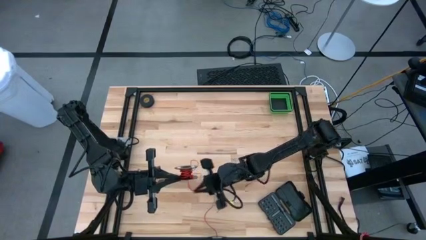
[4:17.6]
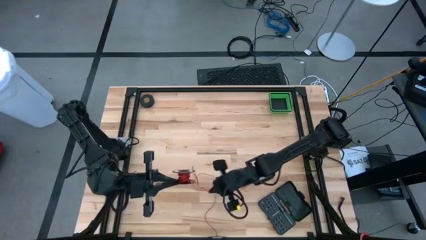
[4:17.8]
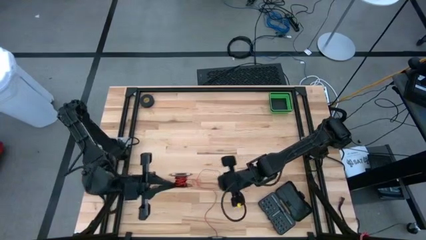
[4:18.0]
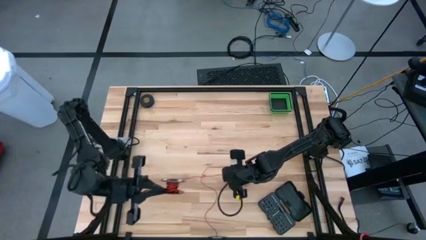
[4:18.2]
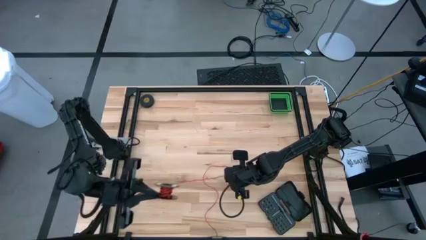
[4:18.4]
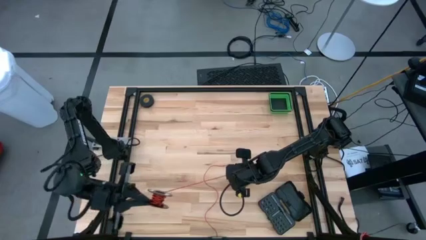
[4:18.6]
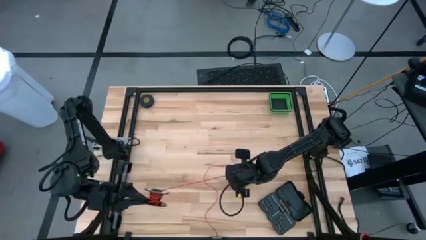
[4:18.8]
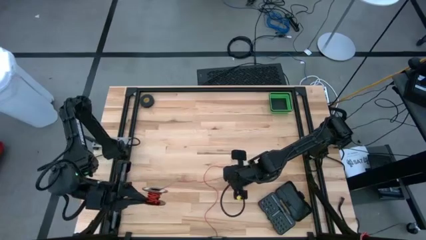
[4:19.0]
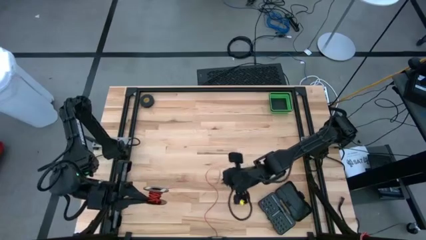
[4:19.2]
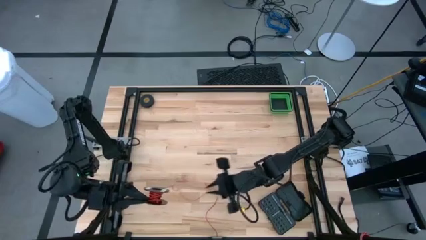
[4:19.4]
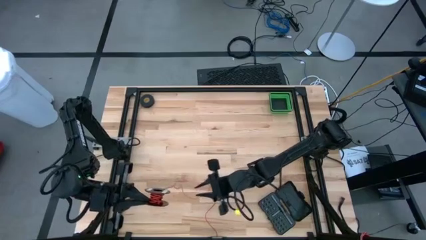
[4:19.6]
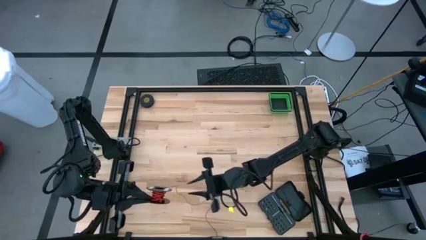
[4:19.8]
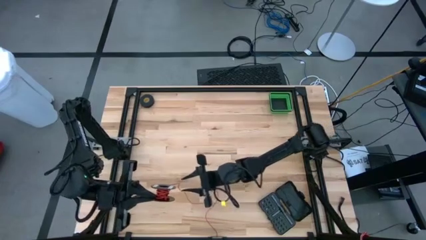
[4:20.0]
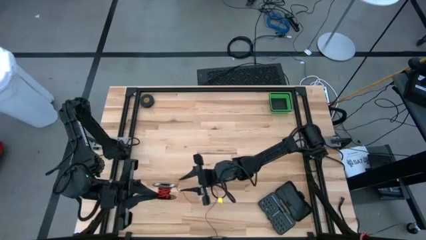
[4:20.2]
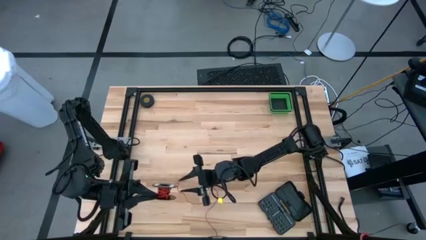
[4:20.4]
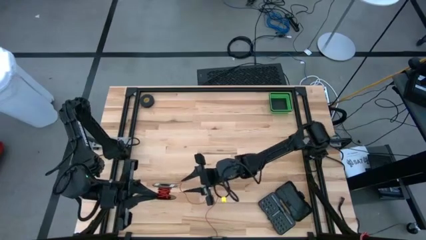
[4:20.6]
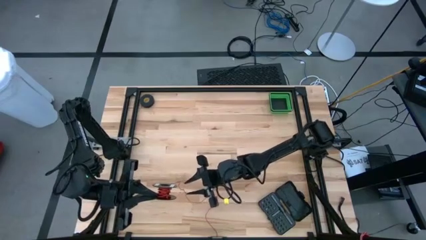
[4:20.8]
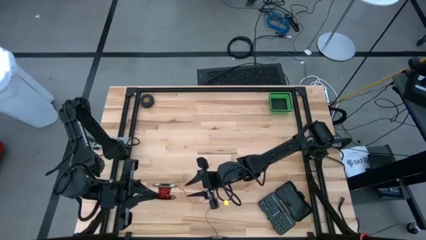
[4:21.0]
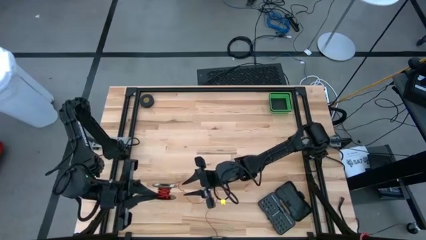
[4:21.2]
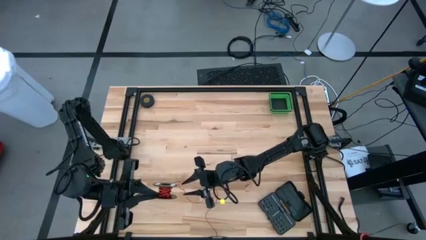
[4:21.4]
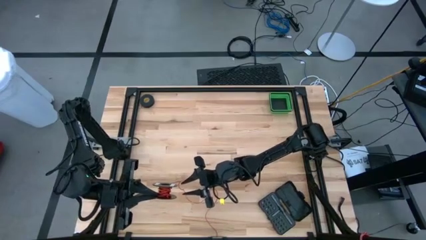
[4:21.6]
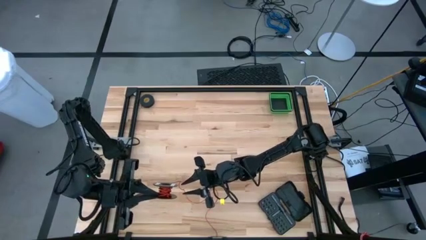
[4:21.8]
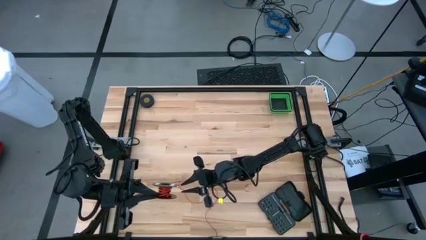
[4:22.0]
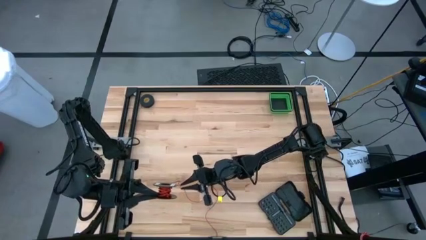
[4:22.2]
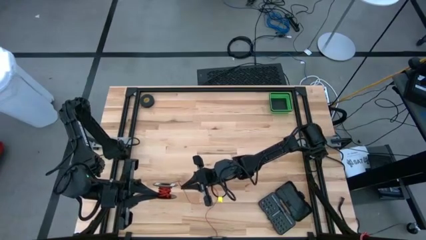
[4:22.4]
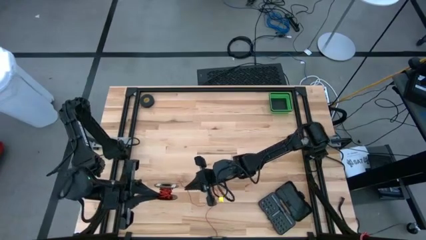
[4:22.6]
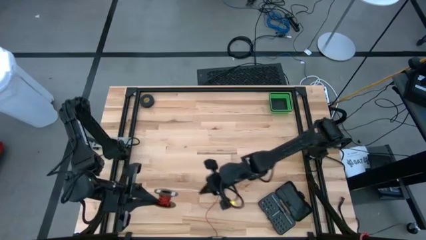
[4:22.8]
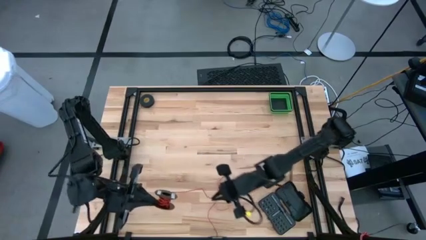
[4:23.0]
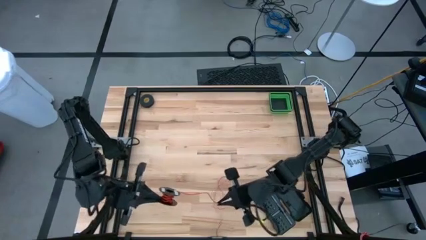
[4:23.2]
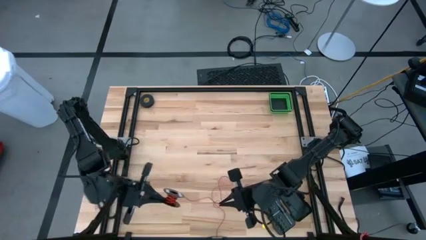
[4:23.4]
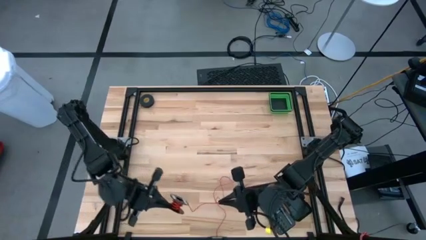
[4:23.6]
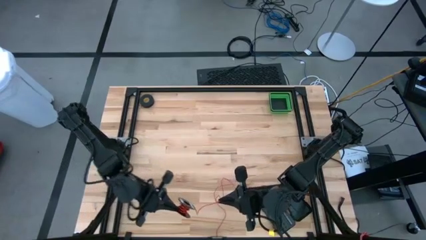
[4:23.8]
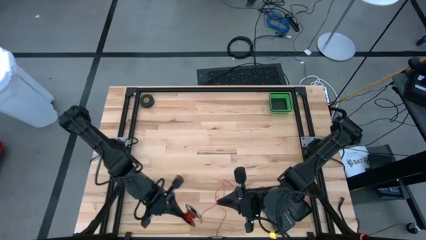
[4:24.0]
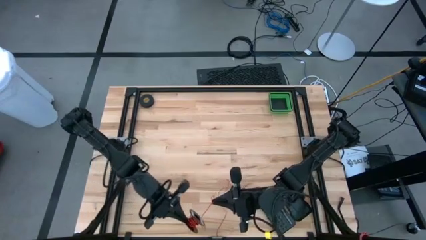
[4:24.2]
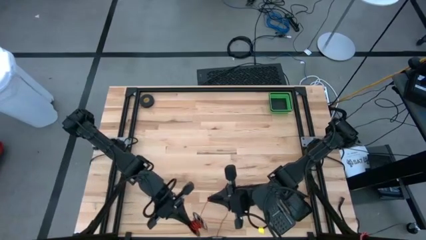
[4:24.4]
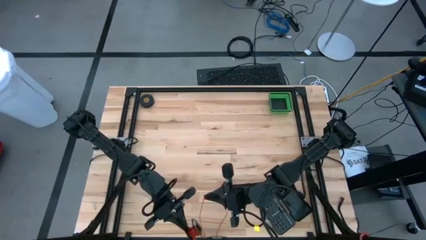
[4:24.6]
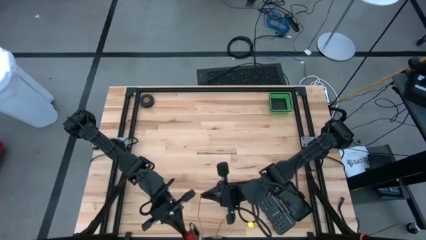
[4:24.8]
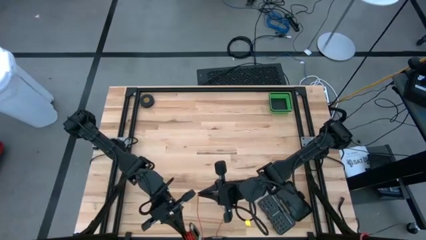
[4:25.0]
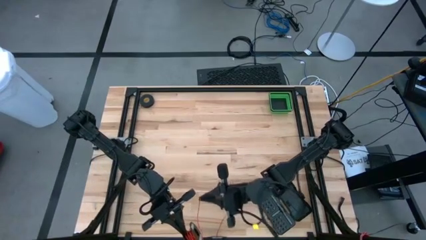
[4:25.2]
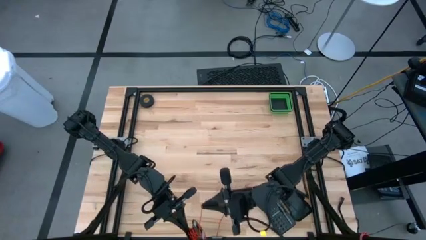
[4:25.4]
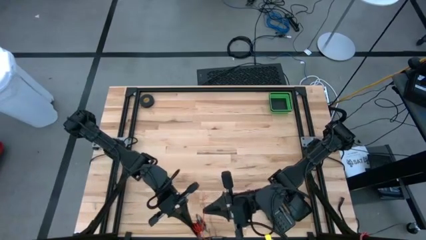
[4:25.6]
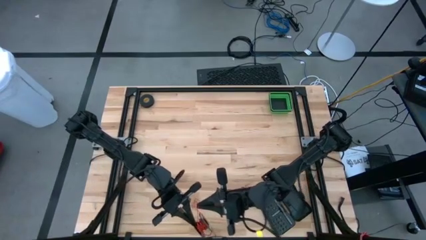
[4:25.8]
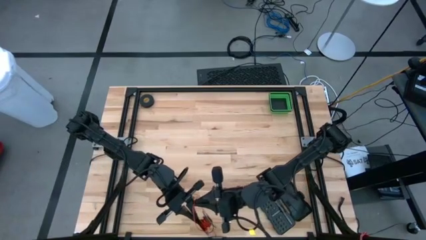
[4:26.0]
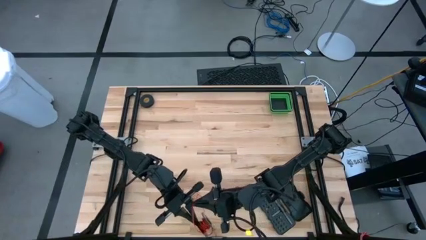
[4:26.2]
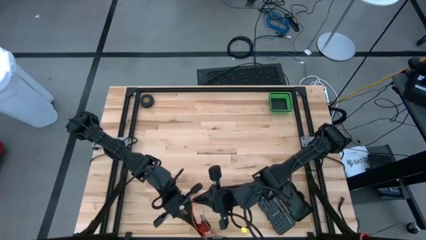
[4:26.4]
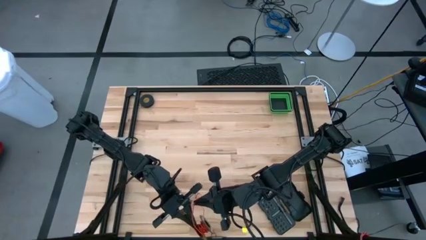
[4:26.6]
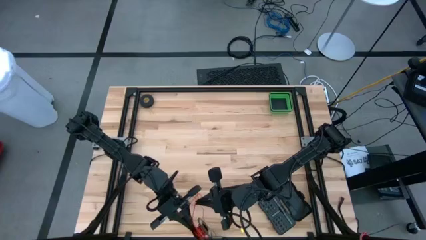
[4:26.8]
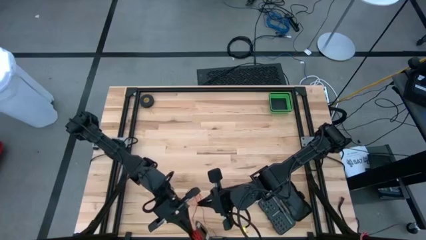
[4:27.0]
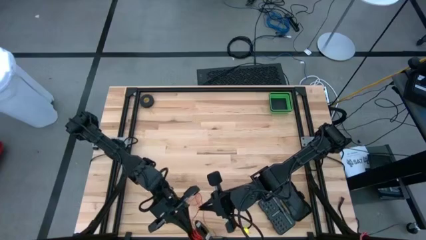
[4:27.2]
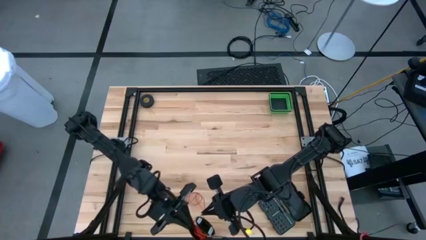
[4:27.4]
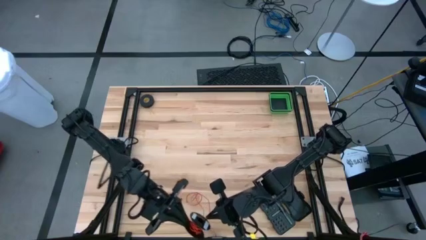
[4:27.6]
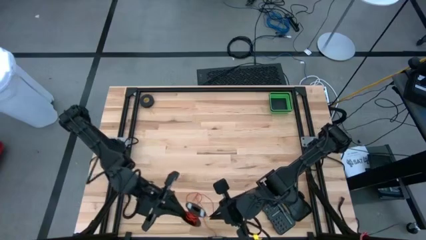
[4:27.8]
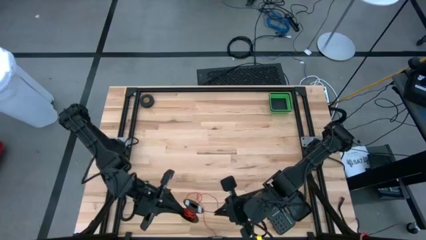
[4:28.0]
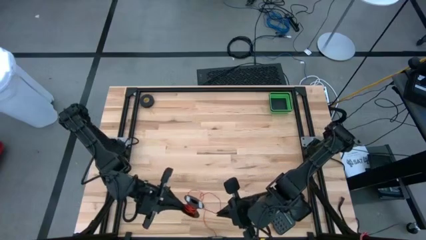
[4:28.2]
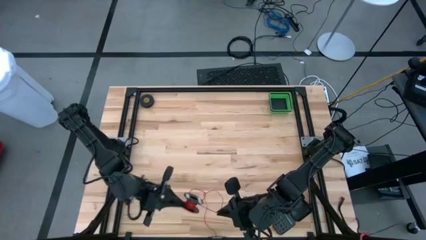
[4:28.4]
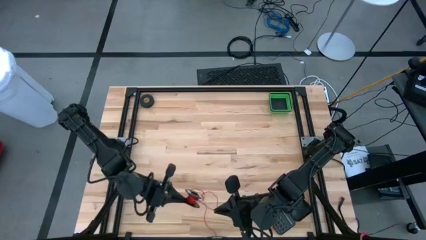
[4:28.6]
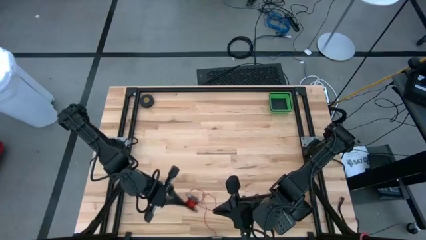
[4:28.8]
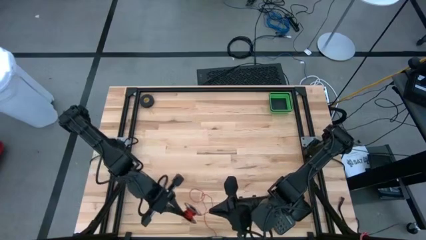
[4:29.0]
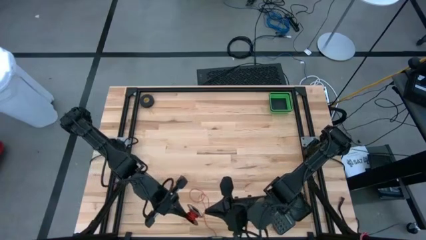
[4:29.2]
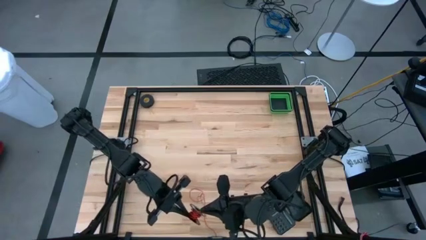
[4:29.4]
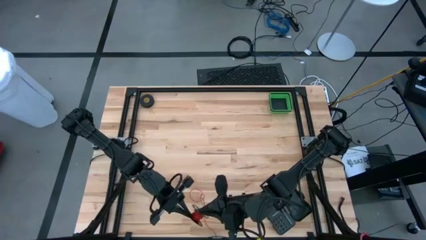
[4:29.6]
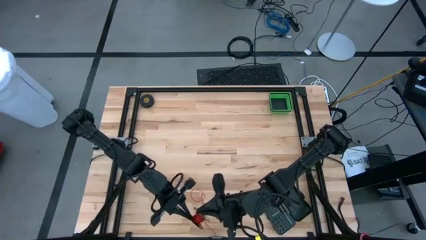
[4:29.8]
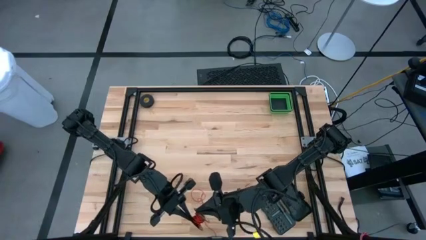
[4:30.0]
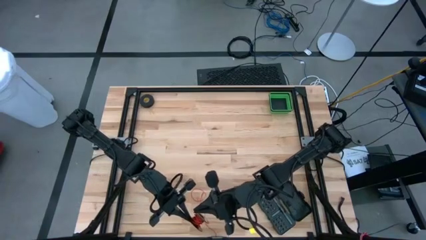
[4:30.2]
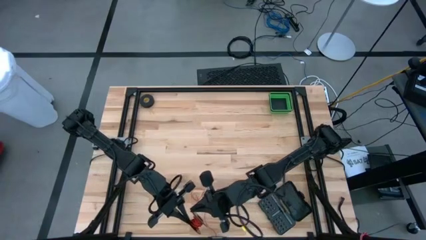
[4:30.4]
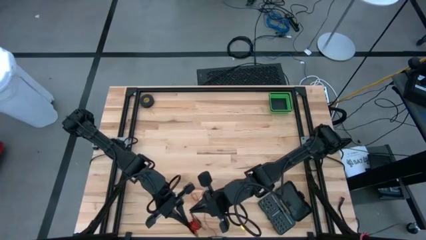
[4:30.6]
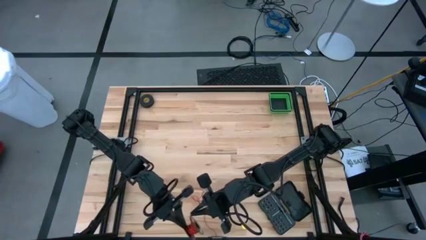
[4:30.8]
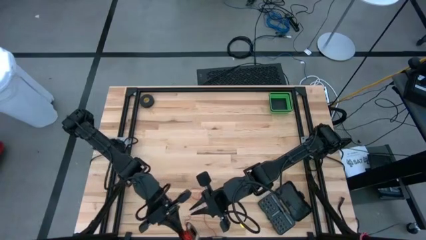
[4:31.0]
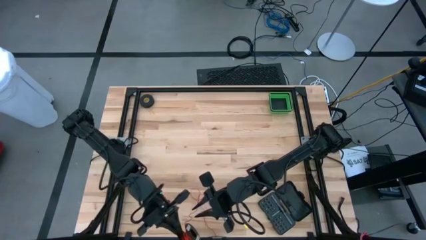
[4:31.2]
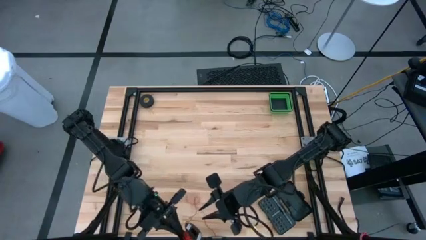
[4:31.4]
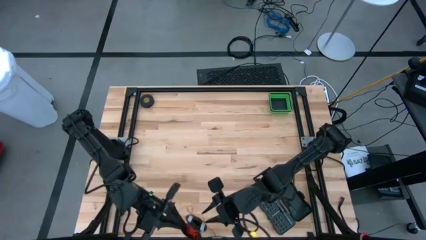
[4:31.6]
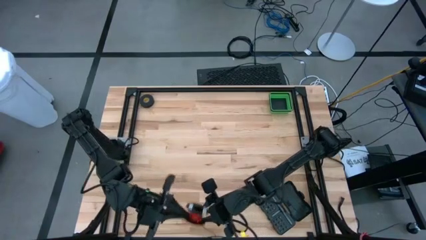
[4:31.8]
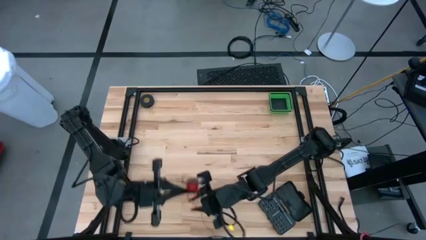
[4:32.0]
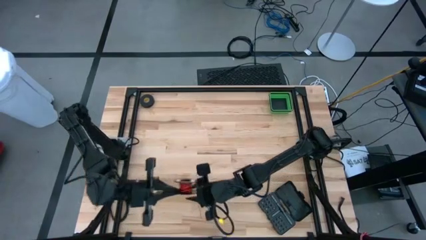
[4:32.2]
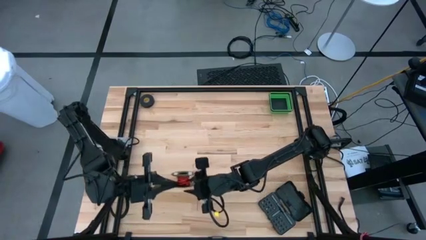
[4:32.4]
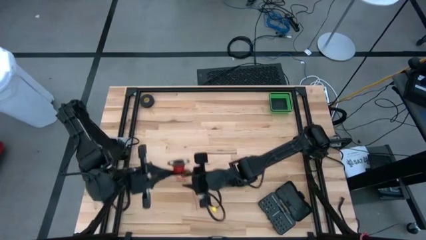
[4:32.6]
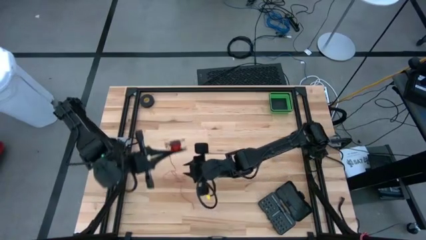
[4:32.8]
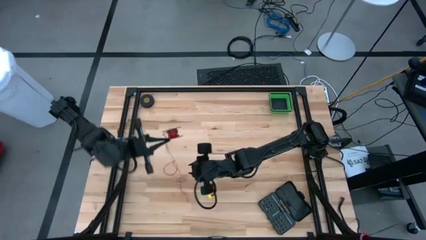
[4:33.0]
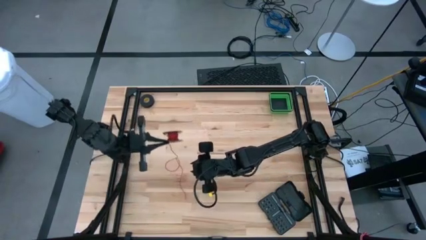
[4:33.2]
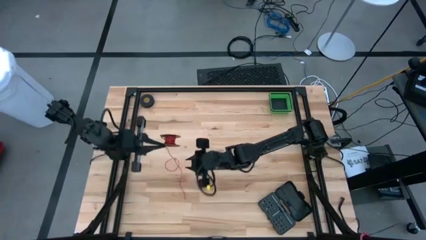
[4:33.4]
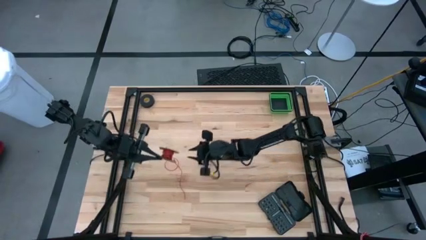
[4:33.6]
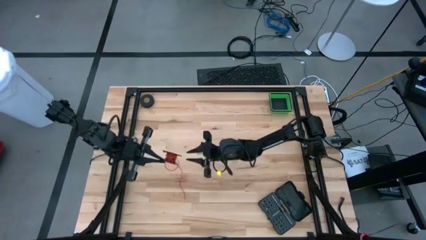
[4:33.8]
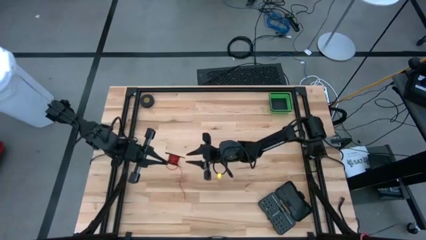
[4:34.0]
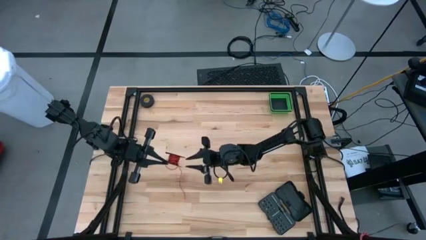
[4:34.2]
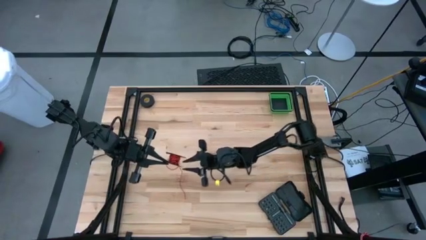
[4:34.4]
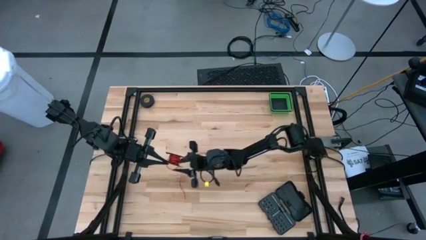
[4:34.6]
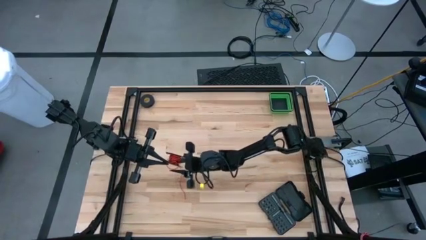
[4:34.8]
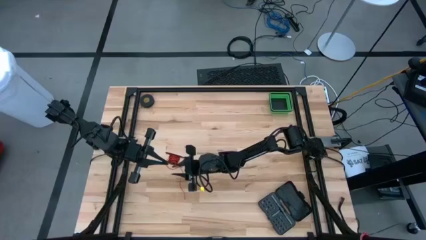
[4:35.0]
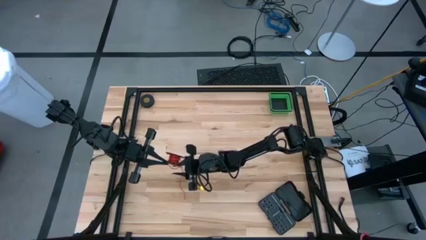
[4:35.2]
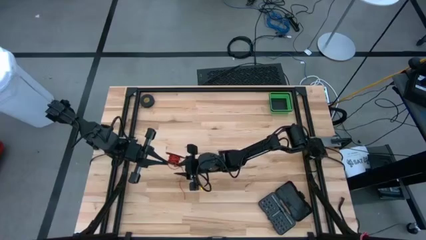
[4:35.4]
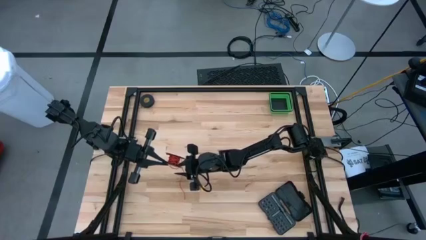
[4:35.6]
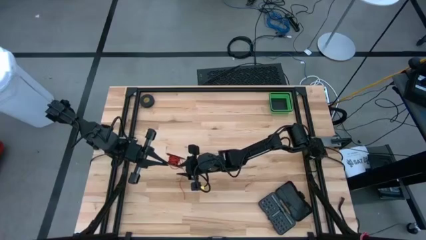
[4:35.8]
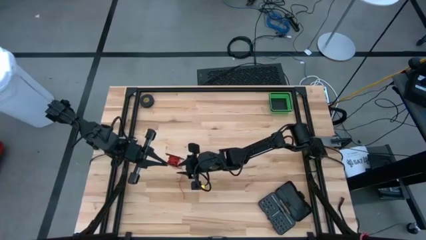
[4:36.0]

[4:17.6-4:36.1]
Task: Coil cords
Coil the red wire on the black spool
